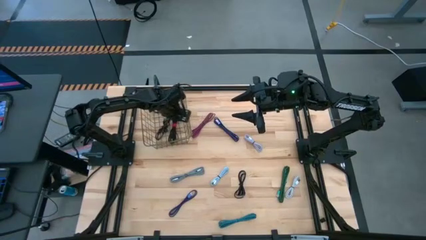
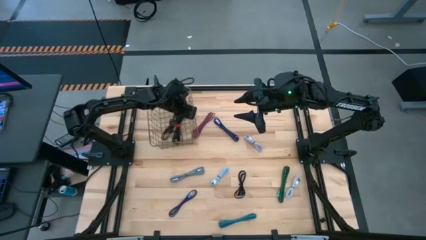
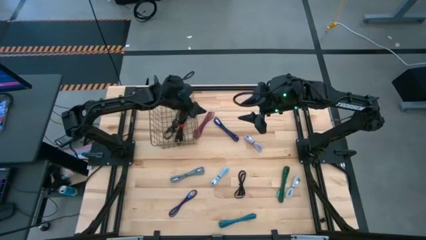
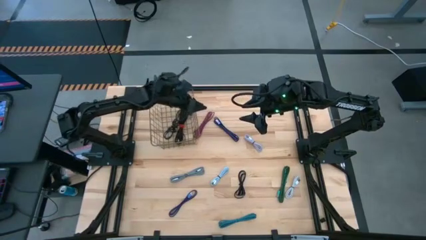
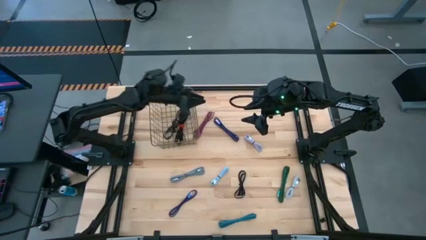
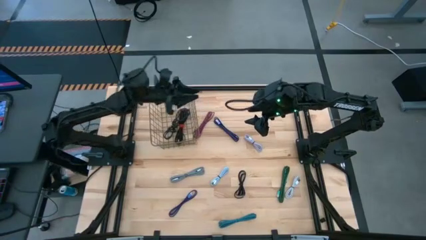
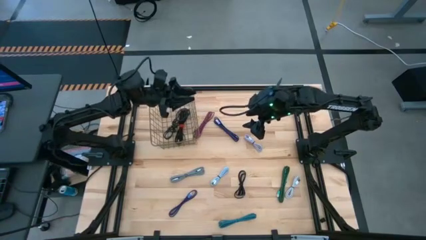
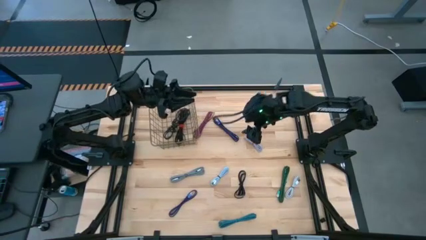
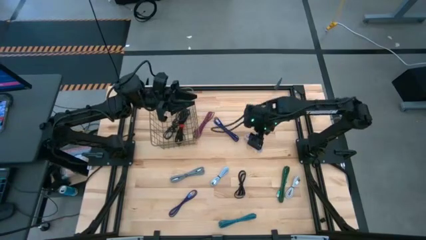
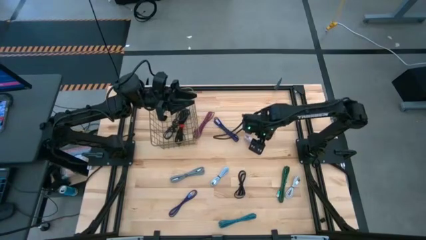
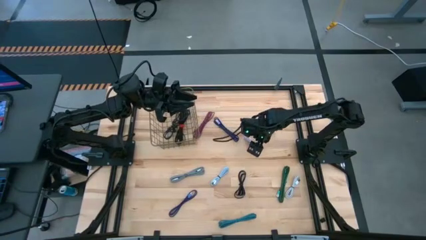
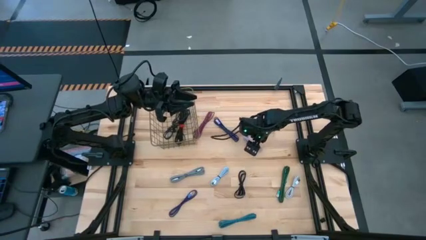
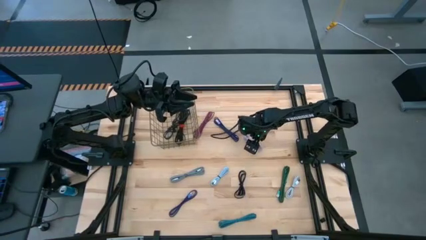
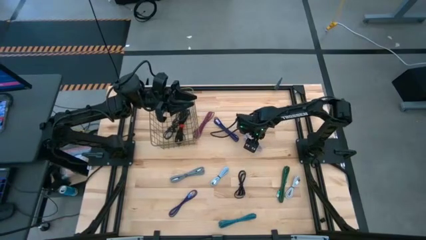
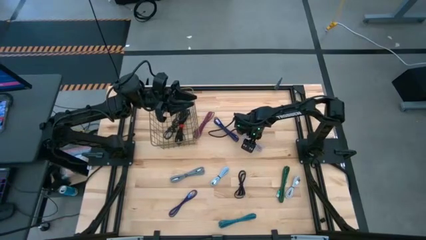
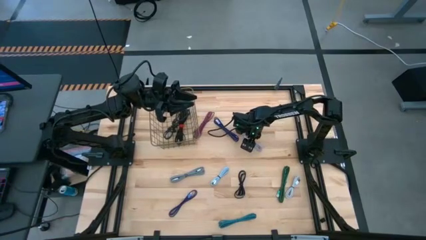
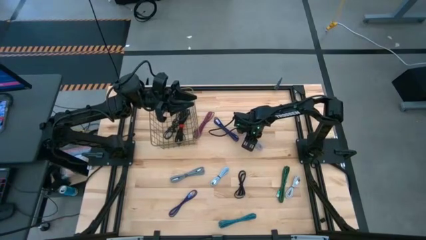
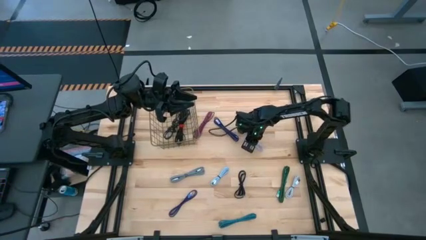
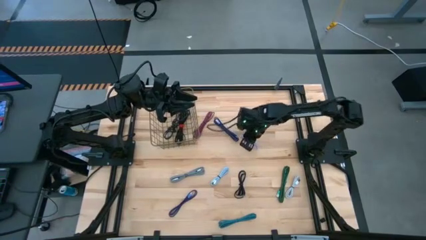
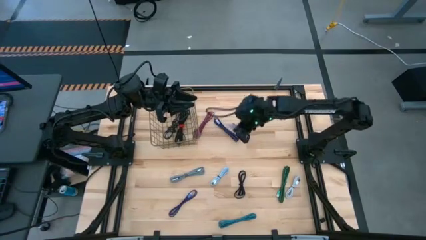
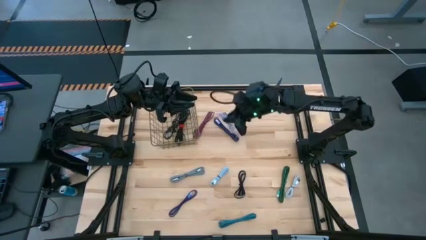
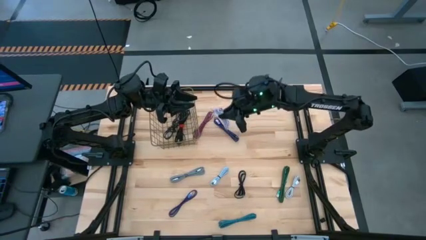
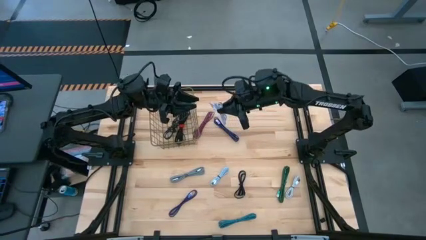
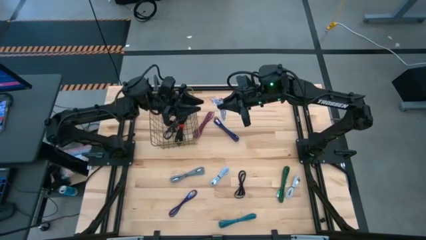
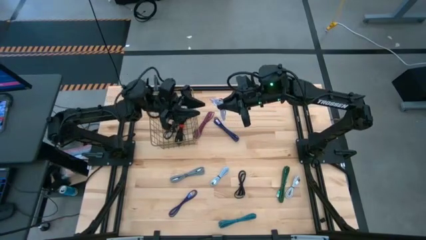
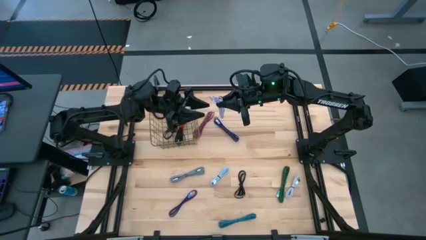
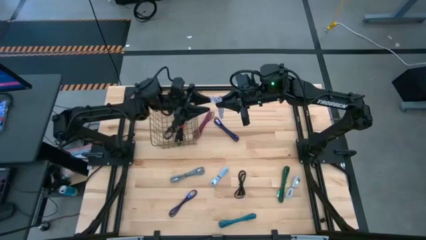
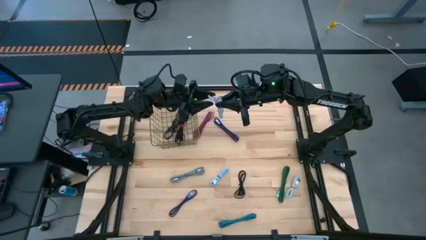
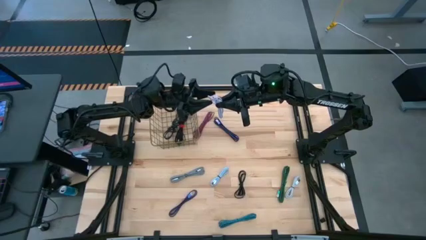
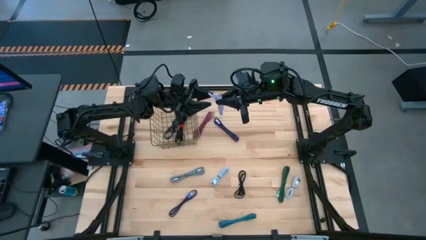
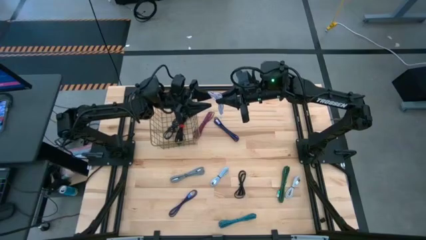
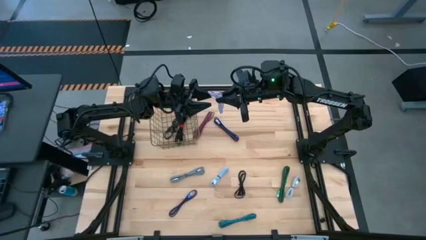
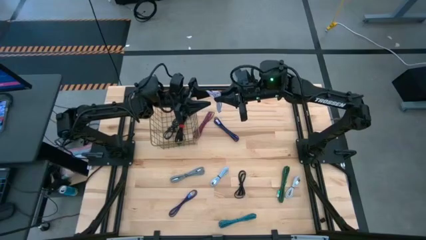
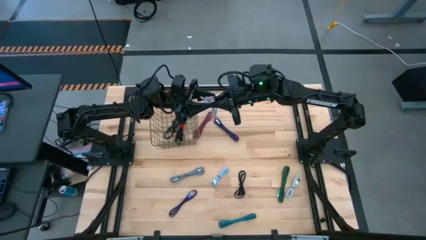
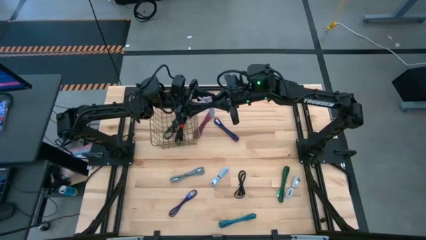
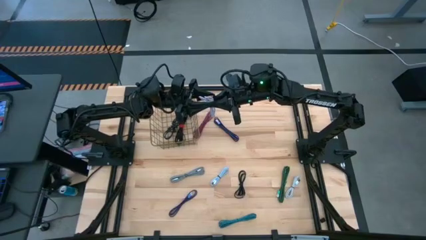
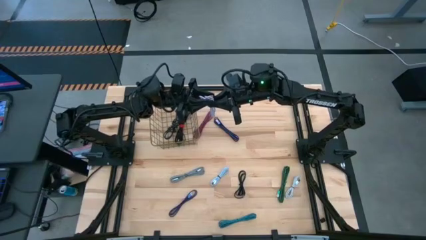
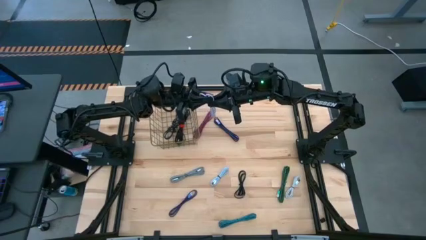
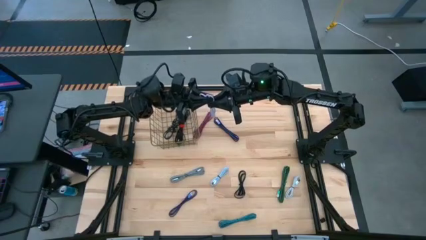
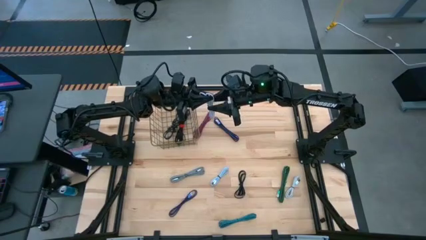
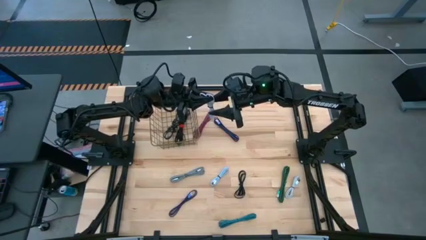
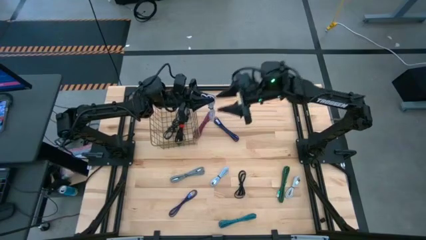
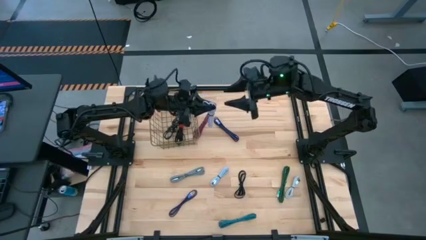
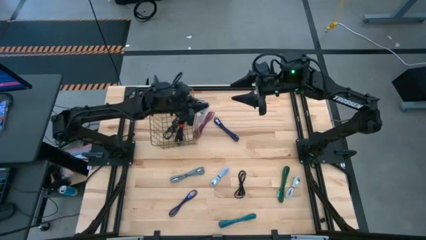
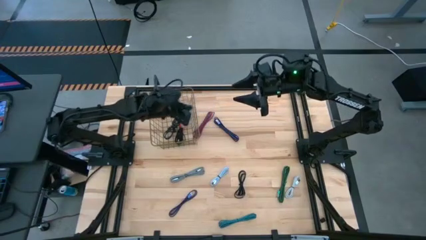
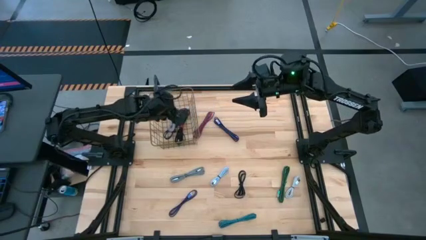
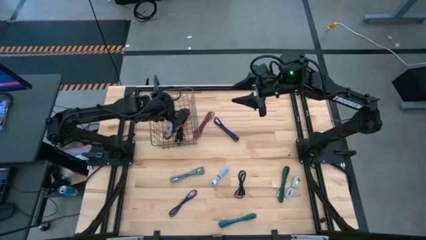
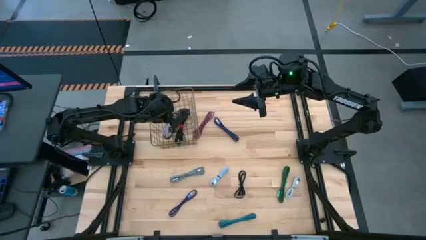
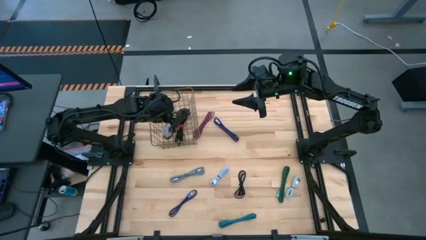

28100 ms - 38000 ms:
Task: Pick and place USB-C Cables
Put the purple charger cable into the gold wire basket

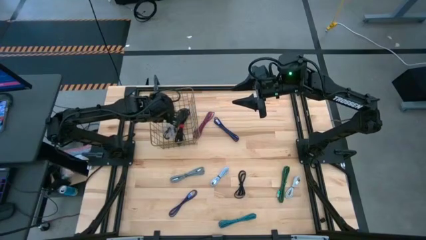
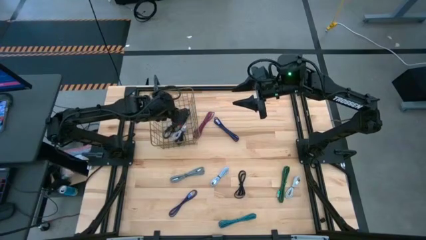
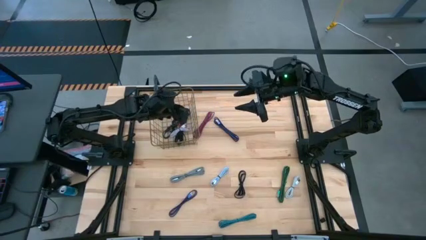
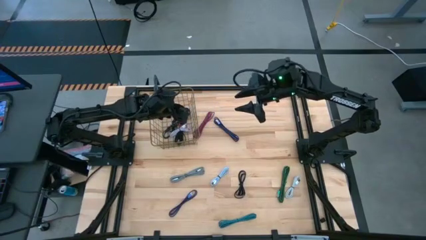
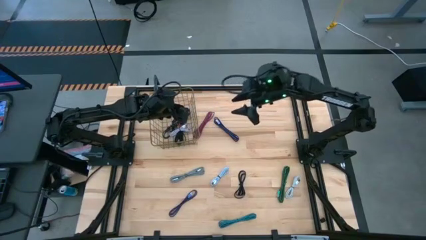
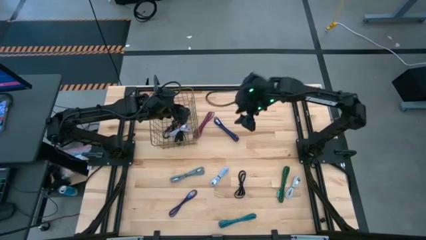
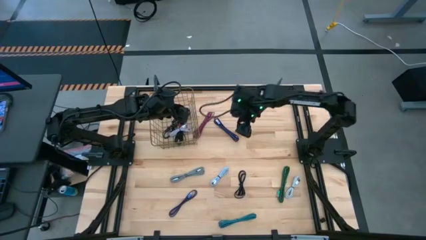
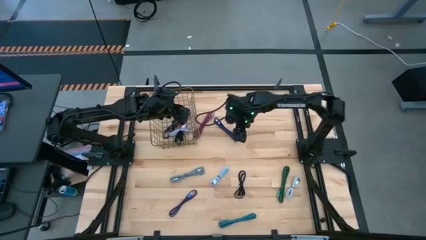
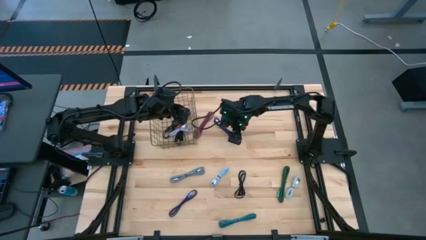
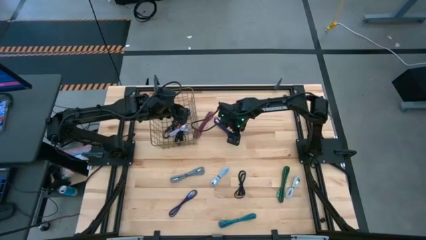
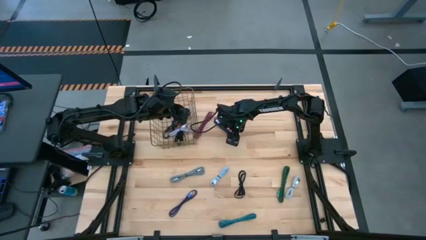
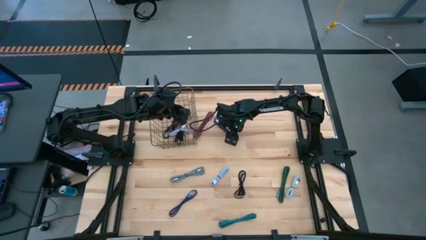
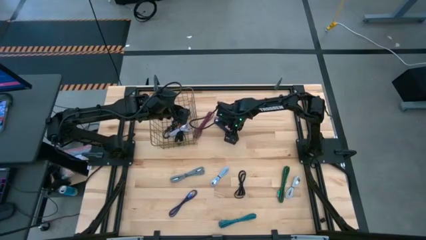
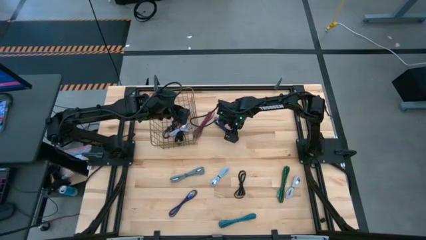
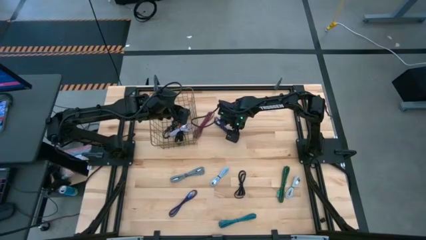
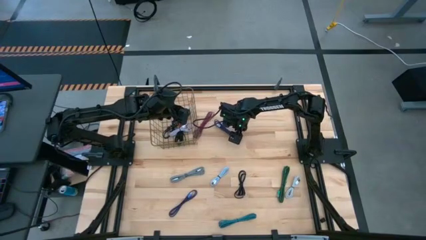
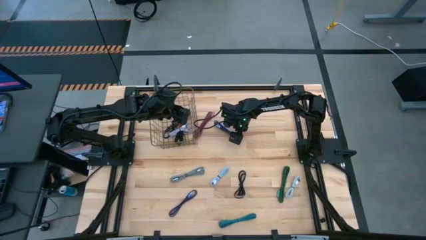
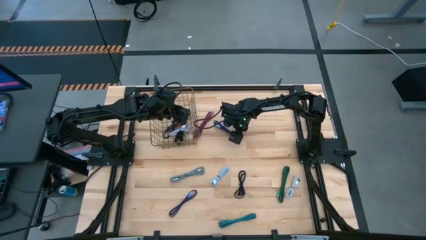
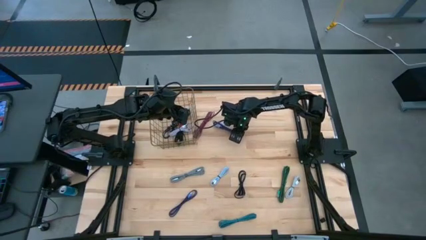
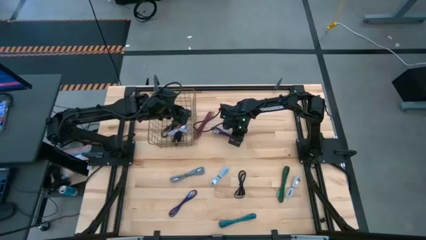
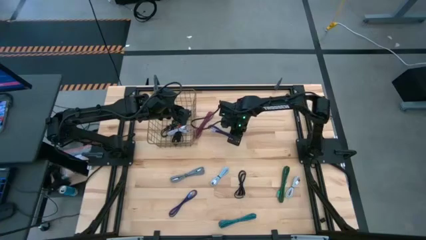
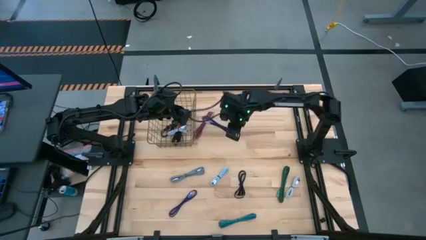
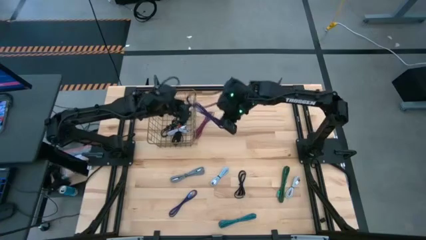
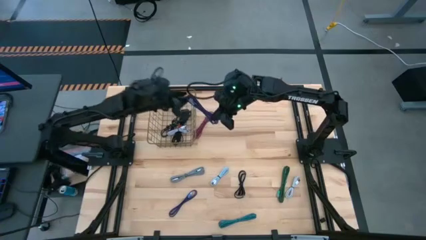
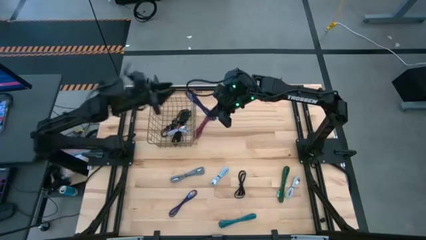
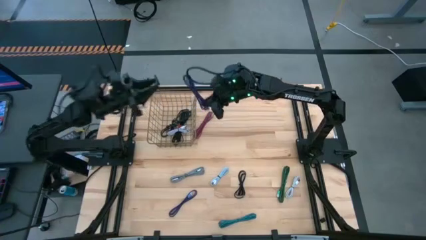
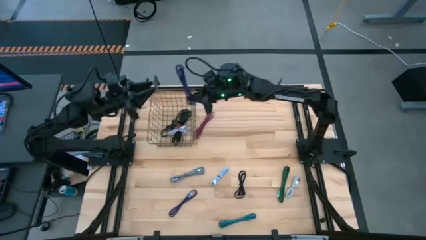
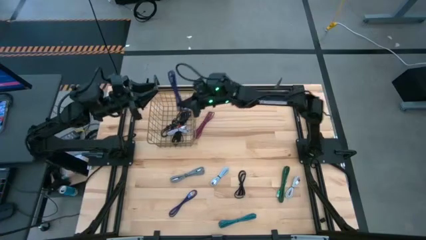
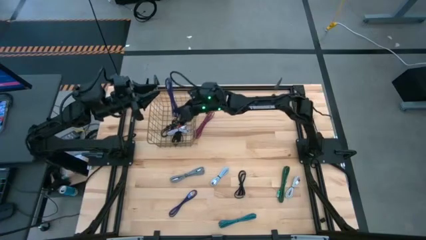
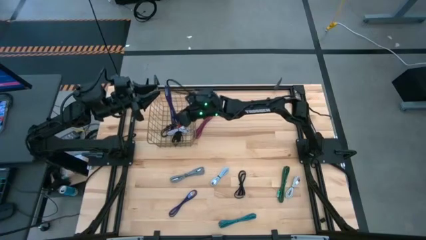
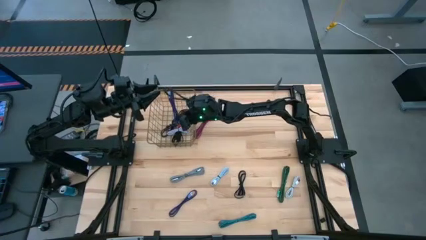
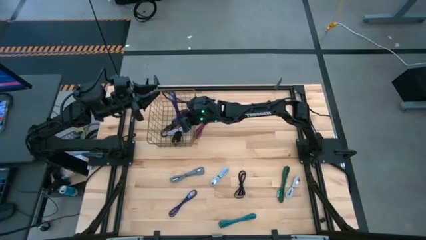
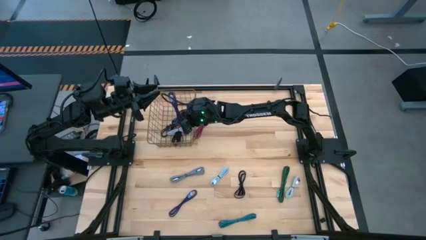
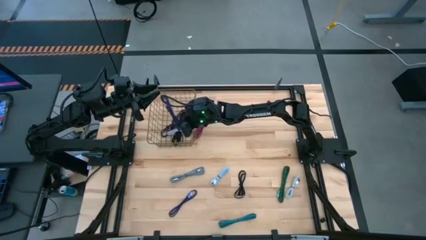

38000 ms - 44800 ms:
Put the top blue patterned charger cable into the gold wire basket
